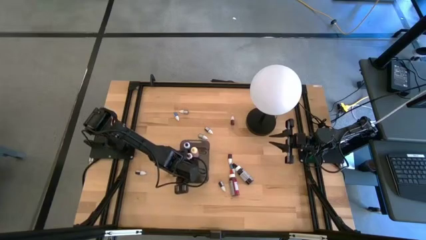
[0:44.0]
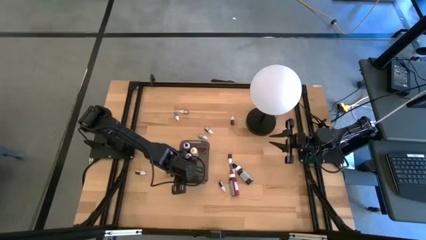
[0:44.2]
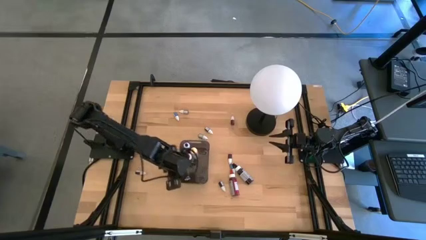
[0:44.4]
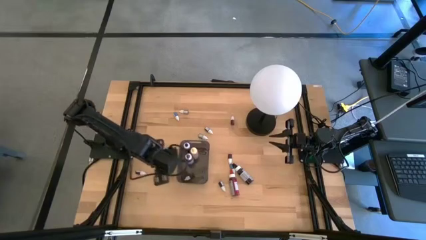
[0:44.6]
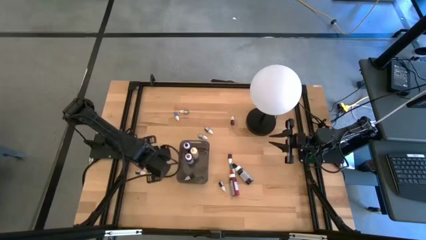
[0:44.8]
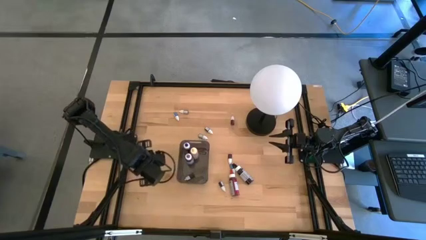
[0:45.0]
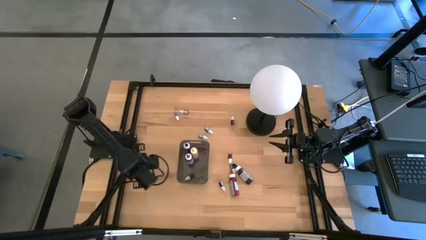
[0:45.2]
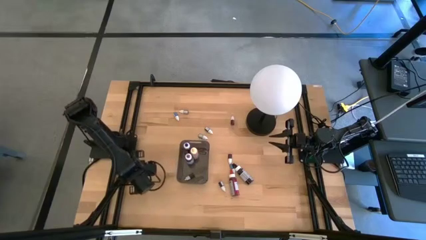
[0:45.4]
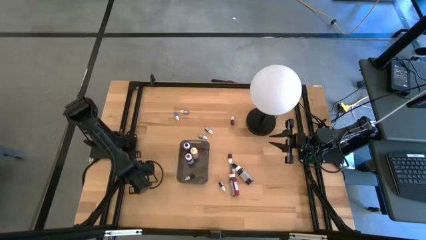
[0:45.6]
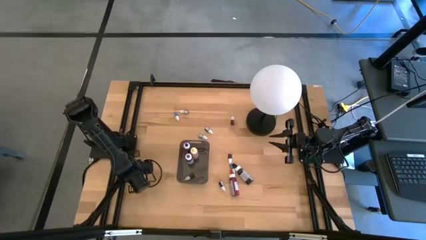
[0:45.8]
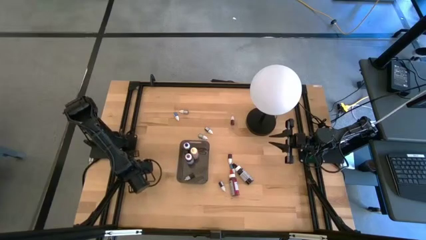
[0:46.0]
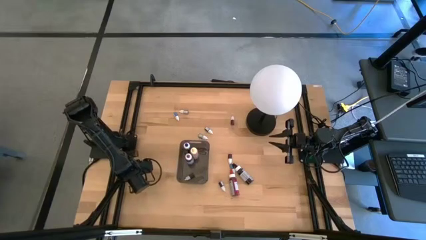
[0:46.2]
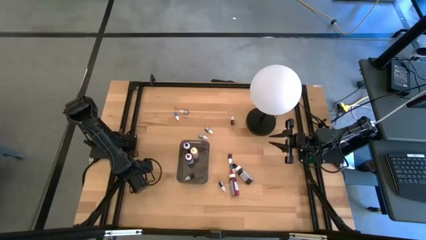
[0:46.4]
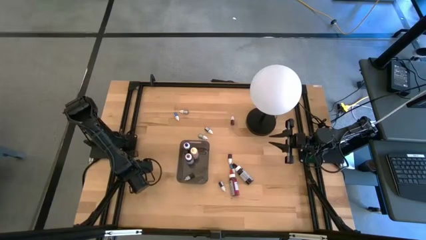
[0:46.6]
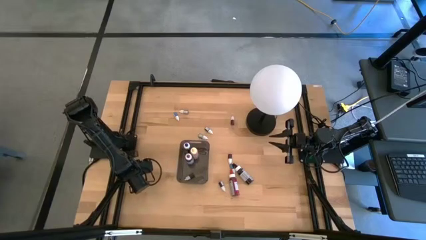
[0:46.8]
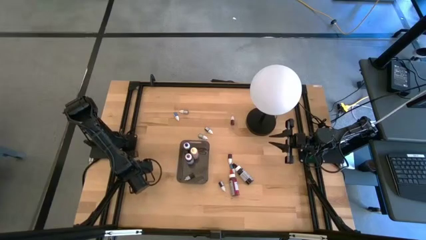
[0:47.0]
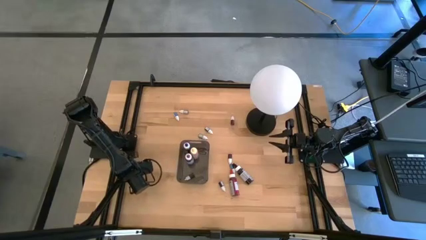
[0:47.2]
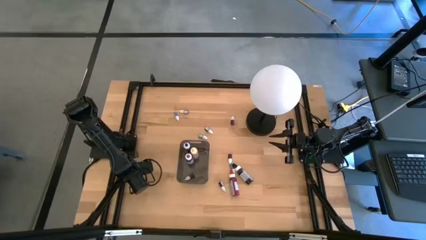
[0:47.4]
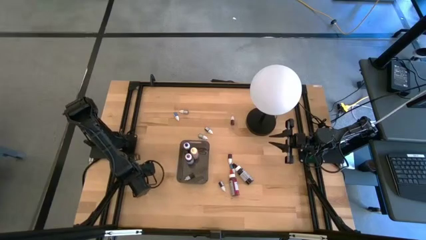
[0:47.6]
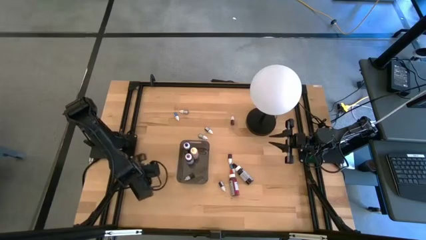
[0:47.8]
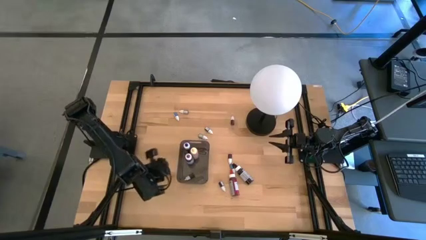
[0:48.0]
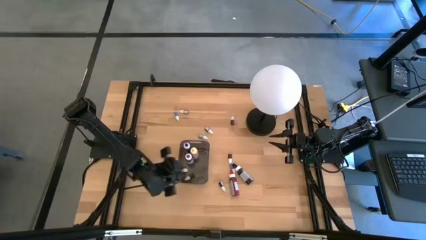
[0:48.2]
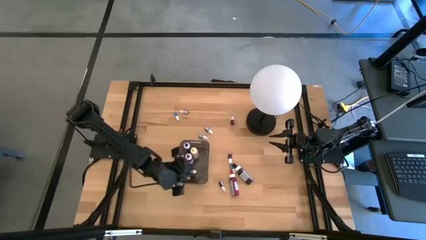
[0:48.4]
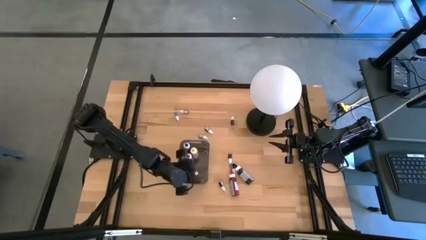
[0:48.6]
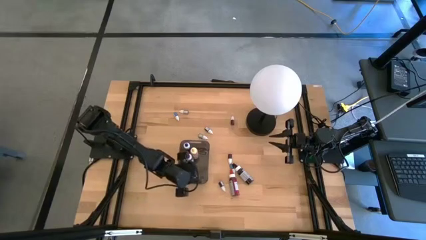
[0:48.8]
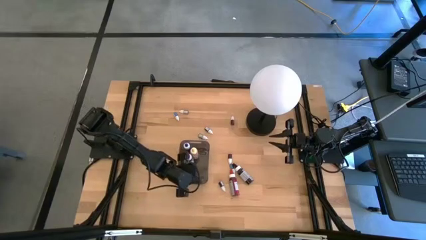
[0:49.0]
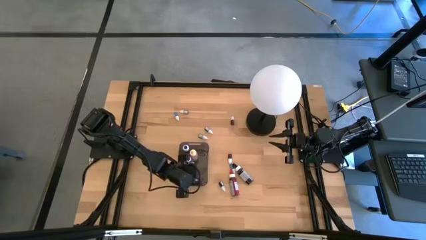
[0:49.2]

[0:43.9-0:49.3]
Task: Pick & Place food coloring
Put the small red food coloring bottle into the black bin

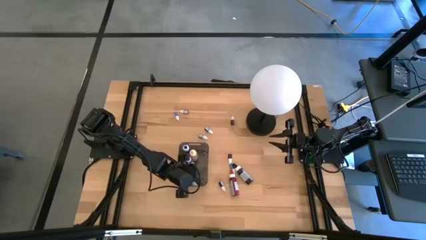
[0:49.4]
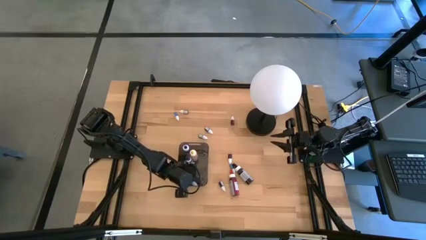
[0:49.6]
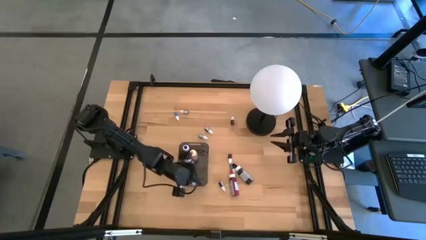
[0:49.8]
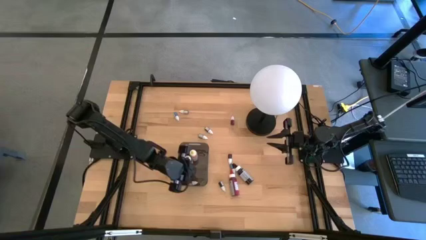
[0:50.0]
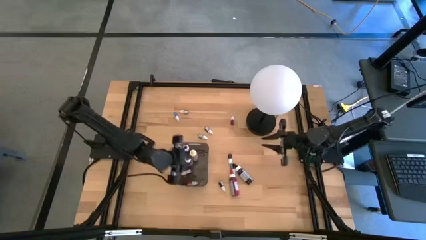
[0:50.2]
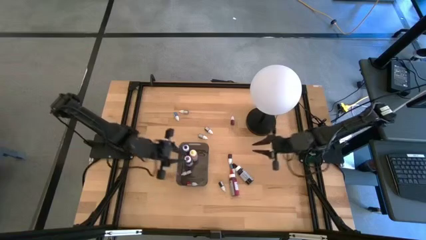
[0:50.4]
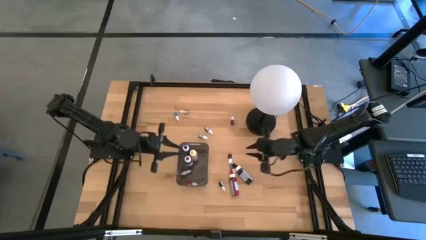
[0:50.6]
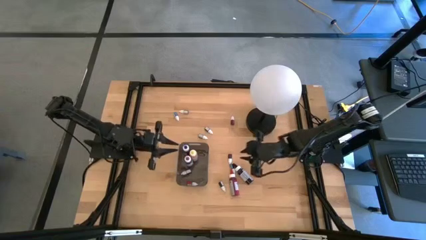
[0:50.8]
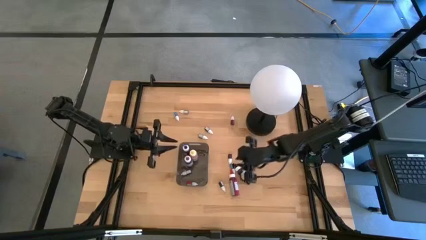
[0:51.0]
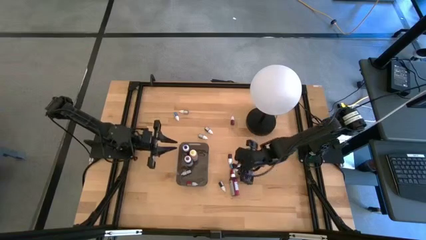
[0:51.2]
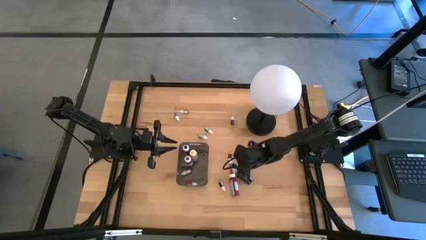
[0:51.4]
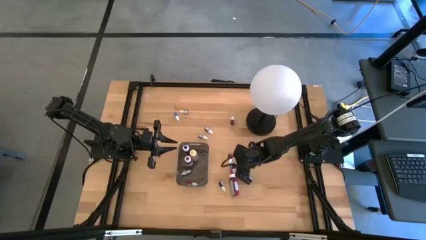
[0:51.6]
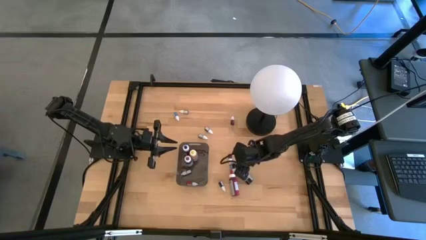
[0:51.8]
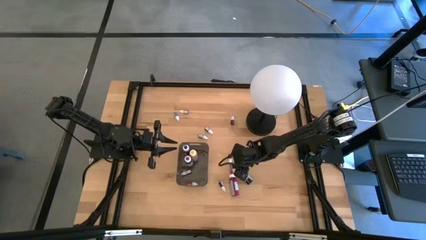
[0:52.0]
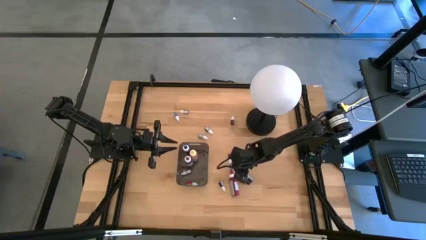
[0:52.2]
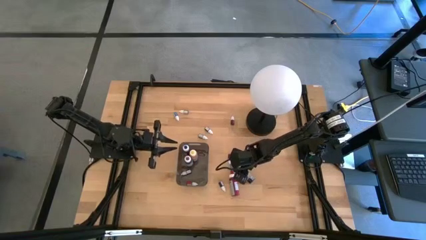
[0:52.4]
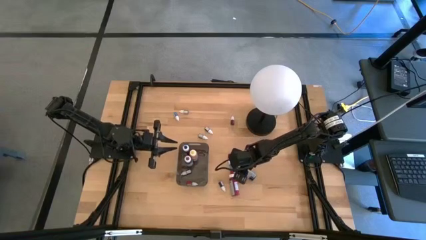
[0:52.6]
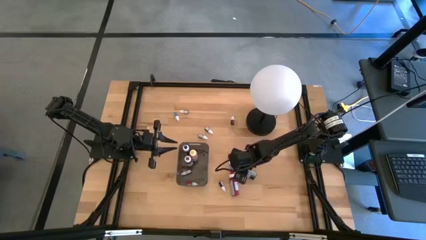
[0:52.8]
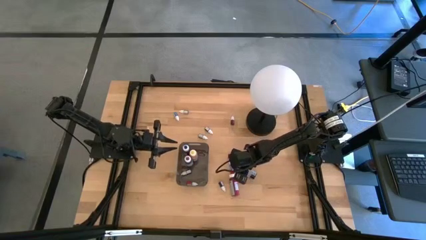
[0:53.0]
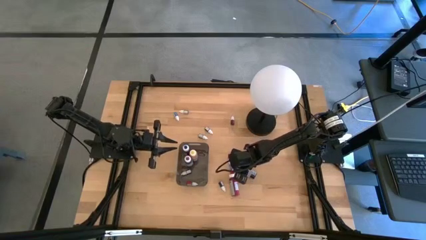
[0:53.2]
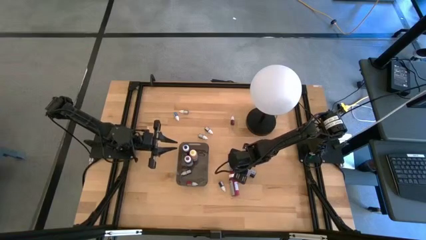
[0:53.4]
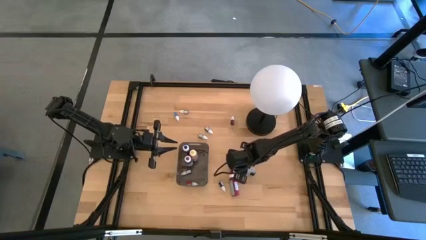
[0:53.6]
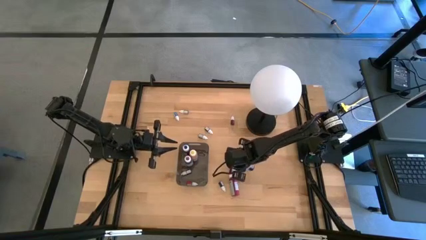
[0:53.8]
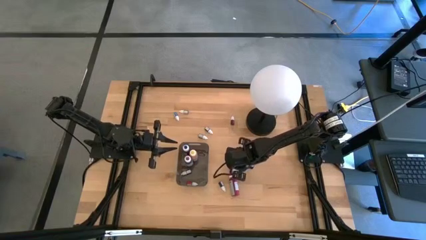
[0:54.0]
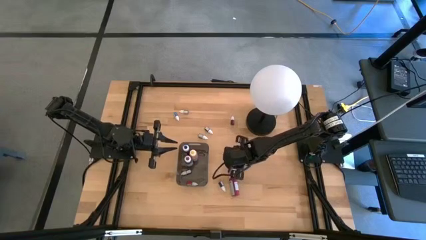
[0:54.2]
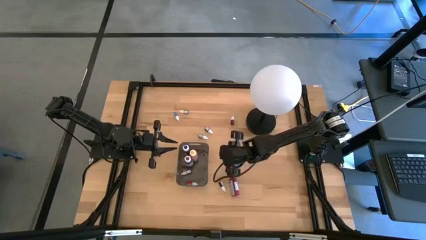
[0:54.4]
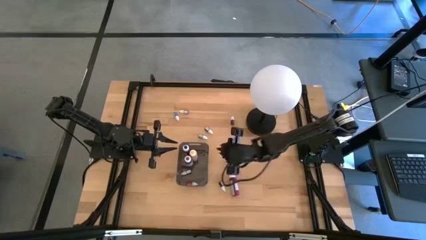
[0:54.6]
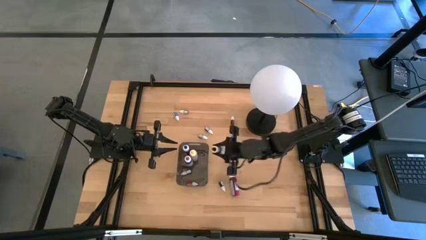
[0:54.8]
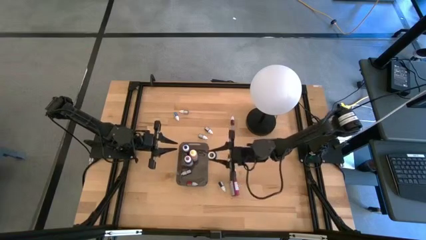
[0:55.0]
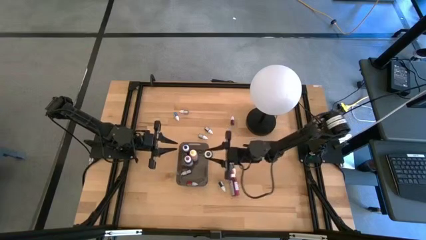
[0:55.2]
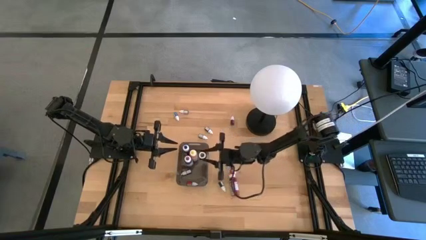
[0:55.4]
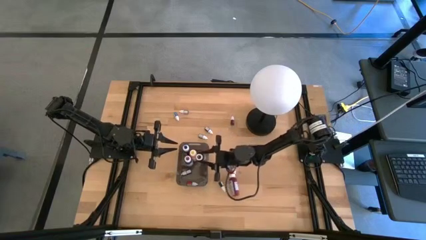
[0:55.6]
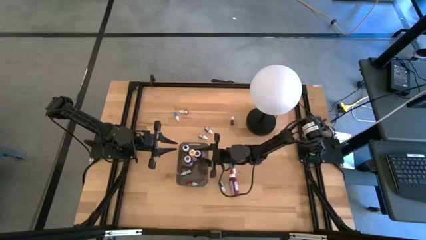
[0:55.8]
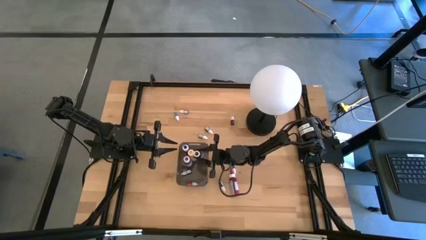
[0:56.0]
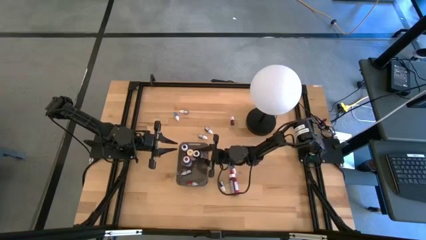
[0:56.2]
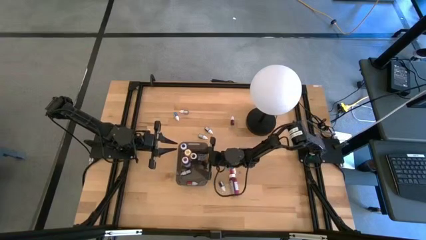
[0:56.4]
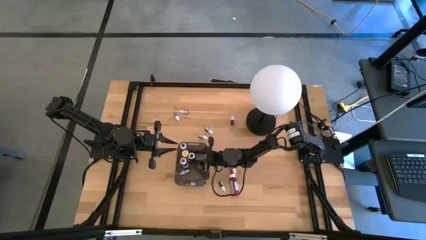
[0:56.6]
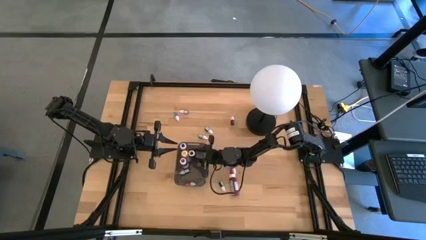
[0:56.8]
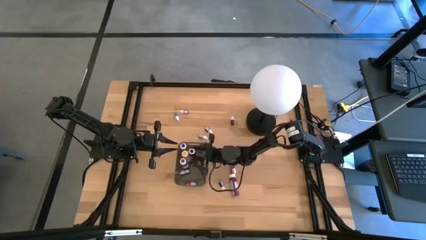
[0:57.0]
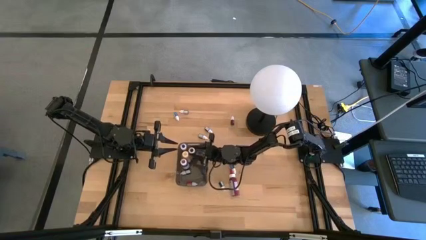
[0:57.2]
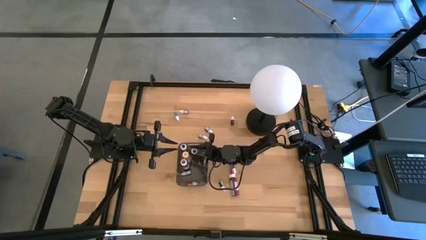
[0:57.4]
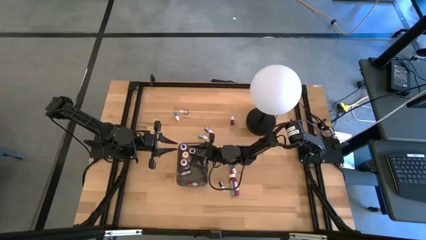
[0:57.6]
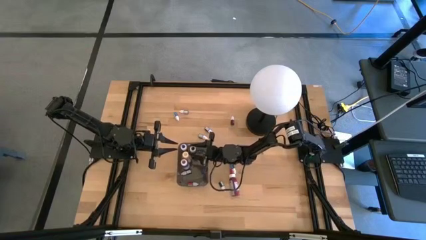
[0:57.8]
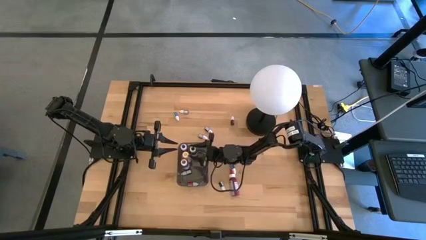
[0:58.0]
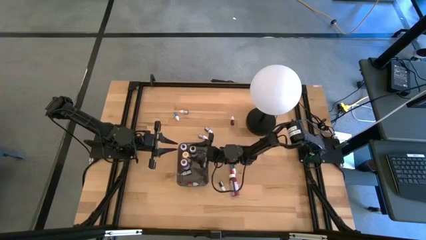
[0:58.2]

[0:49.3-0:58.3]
Put the large black food coloring bottle into the black bin

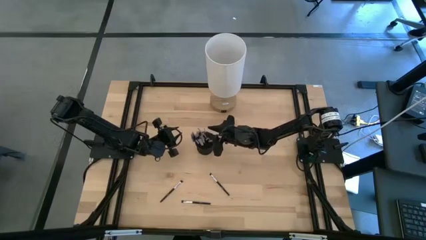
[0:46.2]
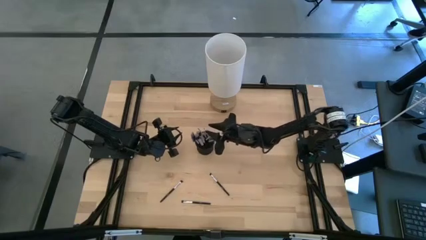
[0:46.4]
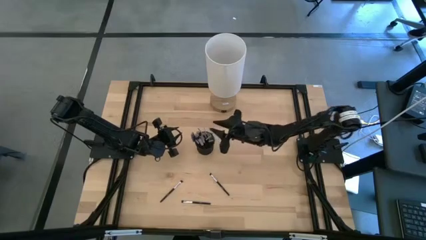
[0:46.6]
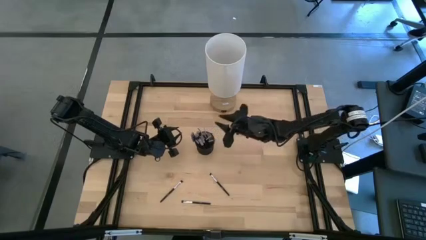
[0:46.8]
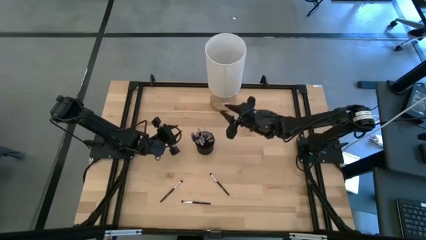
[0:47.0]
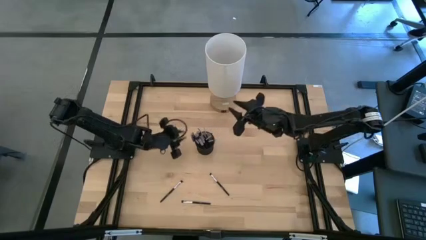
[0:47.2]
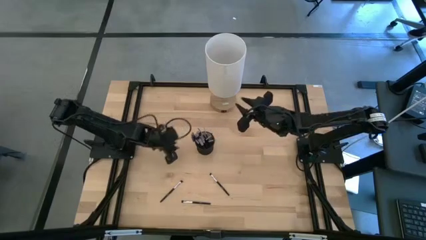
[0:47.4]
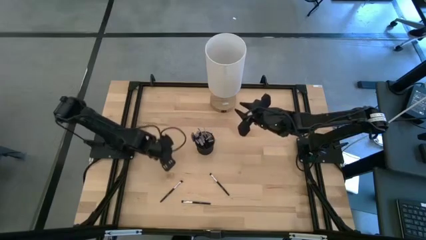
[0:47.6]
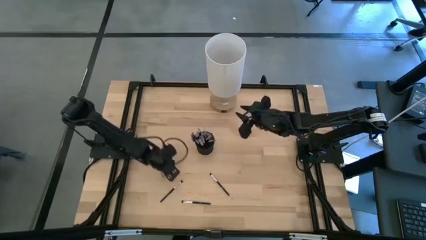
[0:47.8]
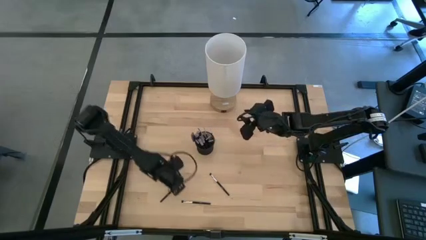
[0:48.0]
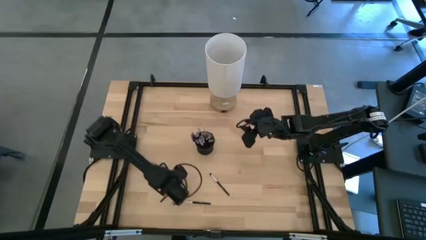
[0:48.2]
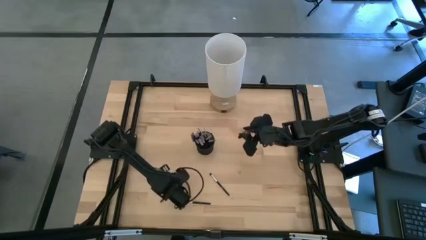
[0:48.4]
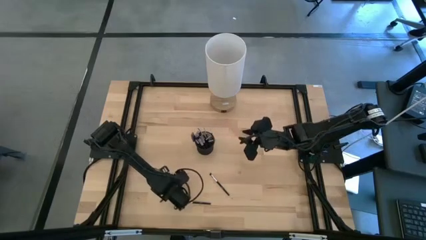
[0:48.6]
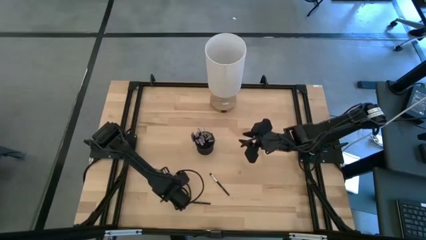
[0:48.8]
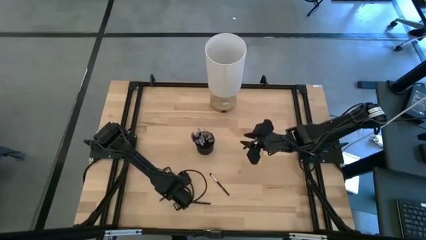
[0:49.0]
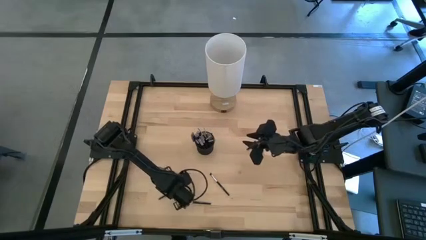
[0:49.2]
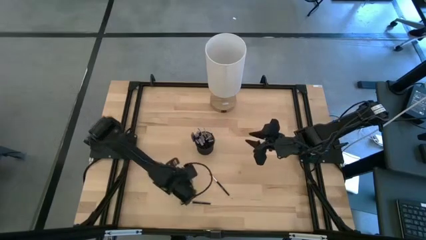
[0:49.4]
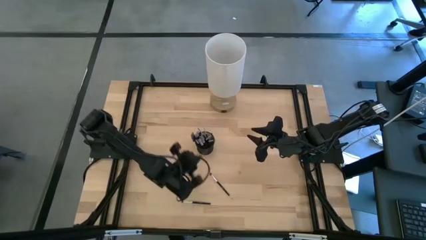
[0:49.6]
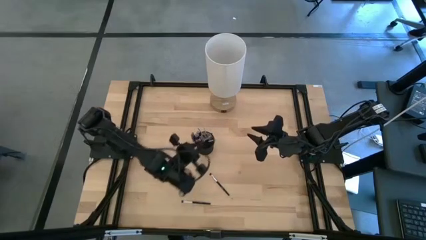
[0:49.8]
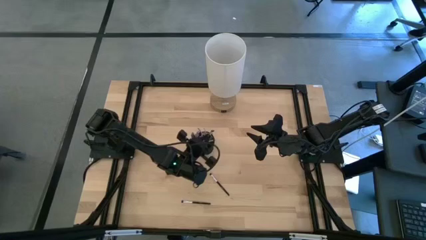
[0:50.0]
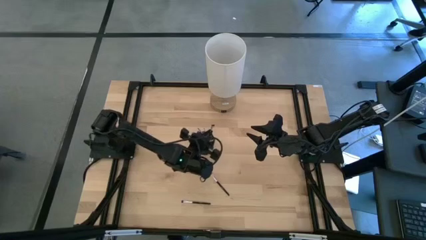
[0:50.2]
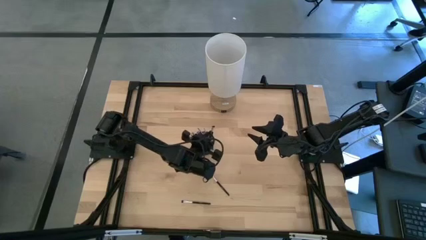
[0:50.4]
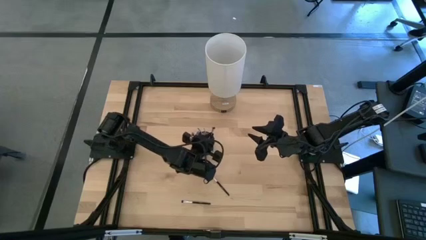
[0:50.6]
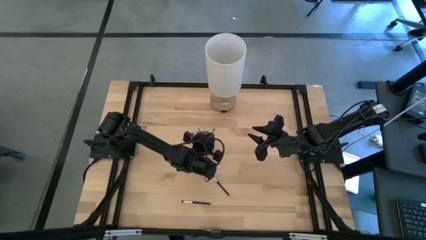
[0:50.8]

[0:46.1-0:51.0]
Task: Put items in baskets/containers
Put the eyeshadow brush into the holder
